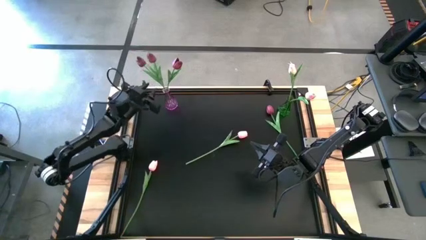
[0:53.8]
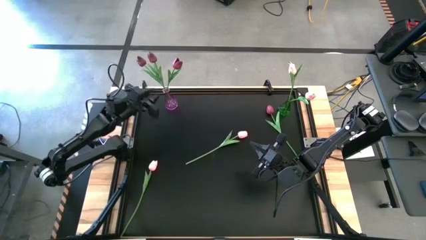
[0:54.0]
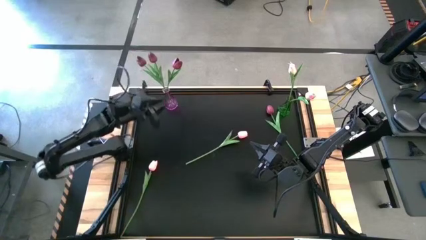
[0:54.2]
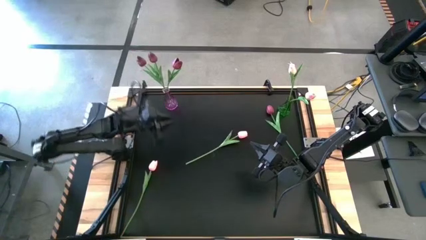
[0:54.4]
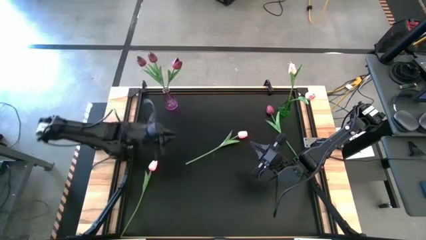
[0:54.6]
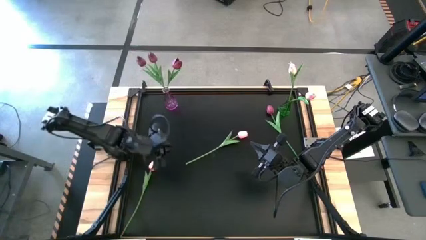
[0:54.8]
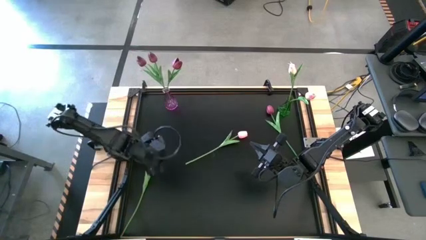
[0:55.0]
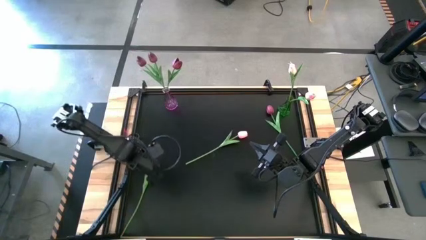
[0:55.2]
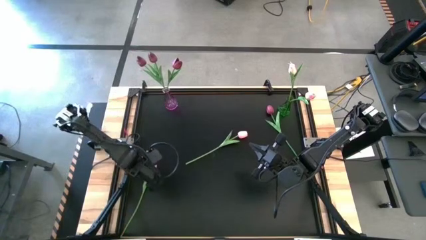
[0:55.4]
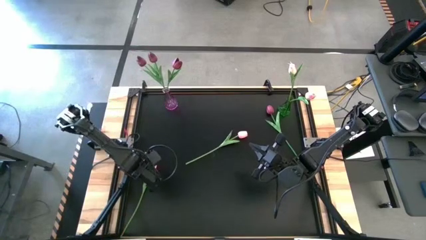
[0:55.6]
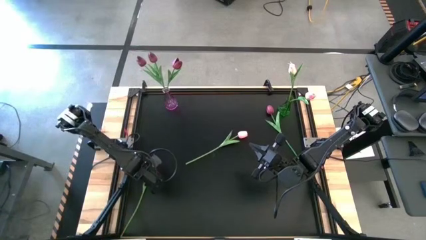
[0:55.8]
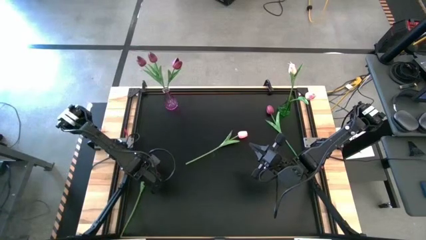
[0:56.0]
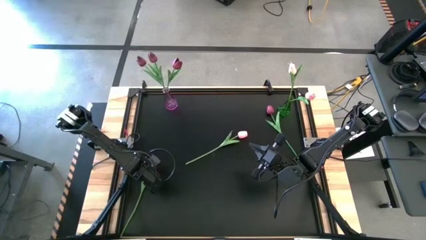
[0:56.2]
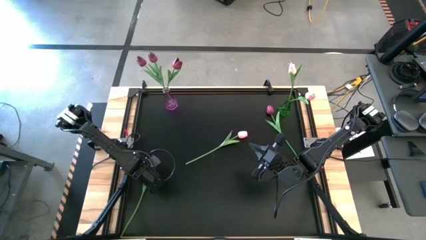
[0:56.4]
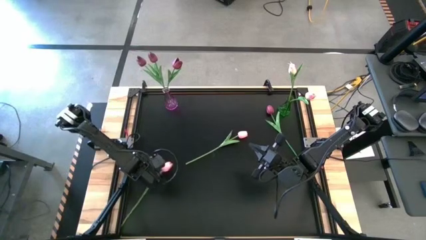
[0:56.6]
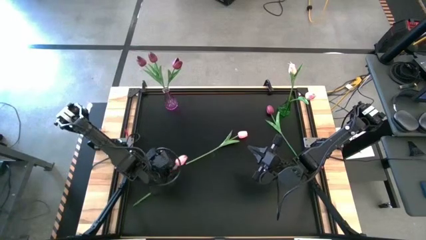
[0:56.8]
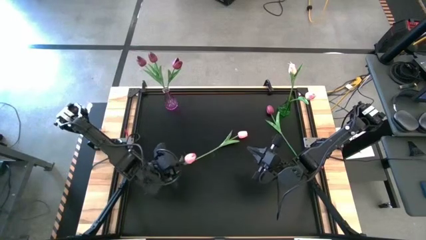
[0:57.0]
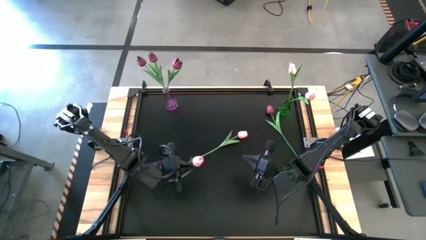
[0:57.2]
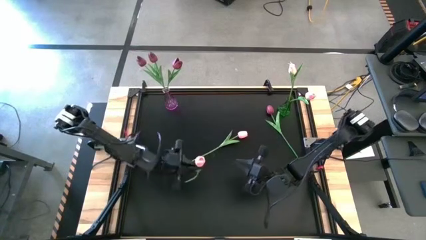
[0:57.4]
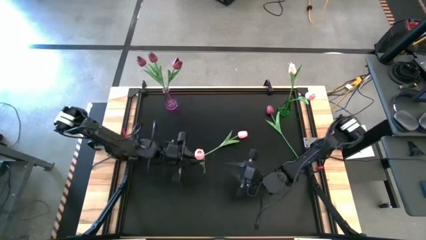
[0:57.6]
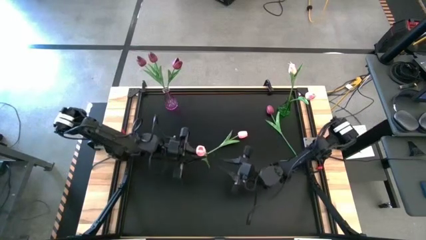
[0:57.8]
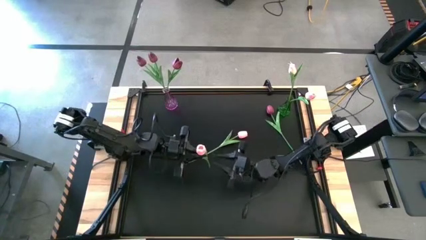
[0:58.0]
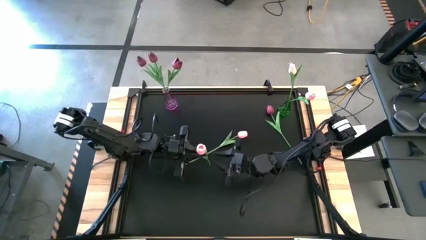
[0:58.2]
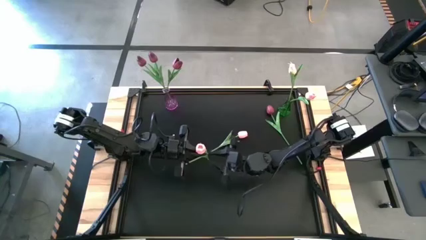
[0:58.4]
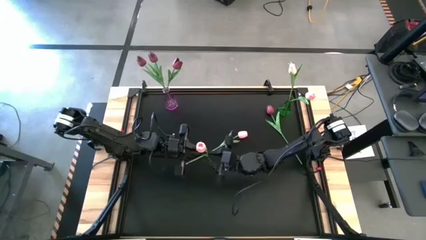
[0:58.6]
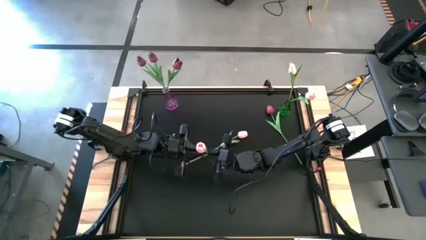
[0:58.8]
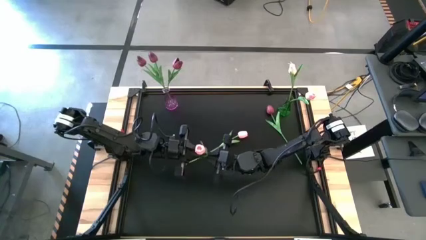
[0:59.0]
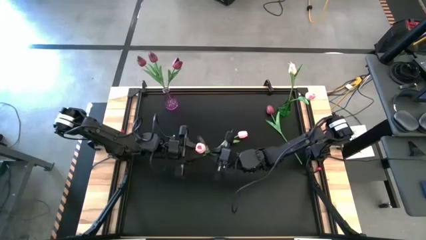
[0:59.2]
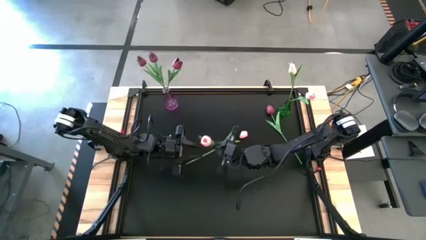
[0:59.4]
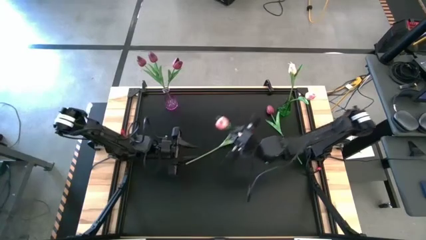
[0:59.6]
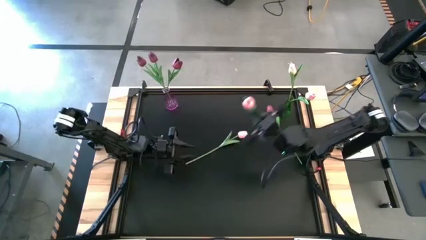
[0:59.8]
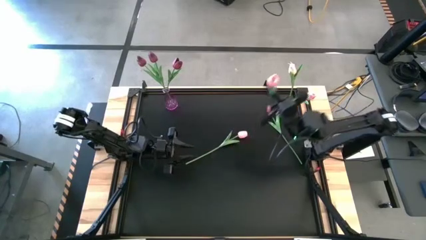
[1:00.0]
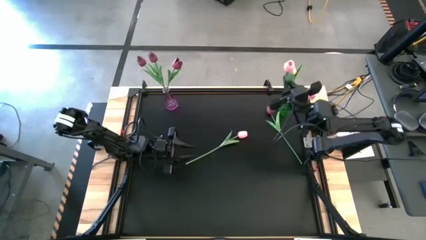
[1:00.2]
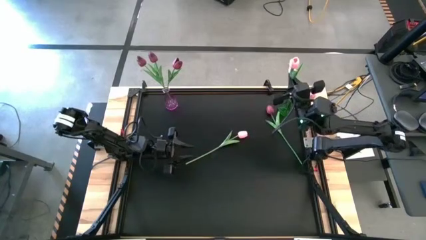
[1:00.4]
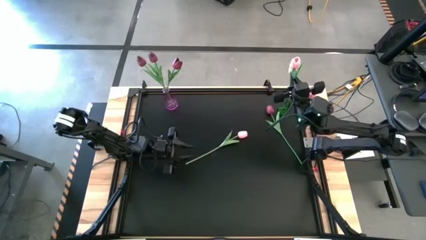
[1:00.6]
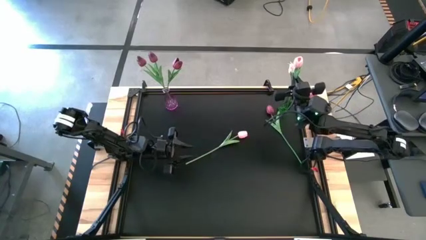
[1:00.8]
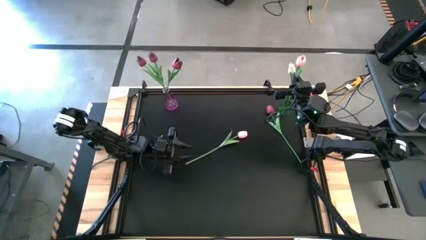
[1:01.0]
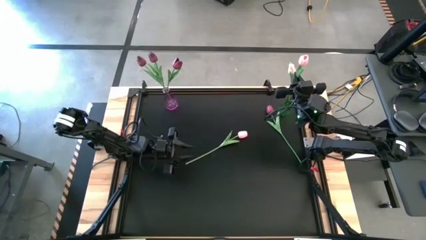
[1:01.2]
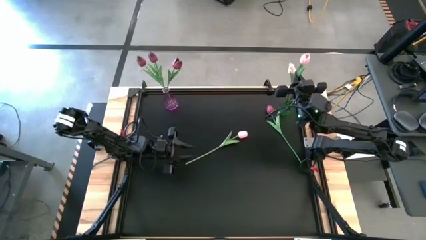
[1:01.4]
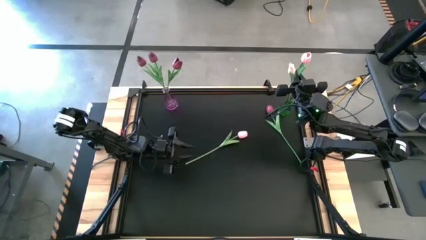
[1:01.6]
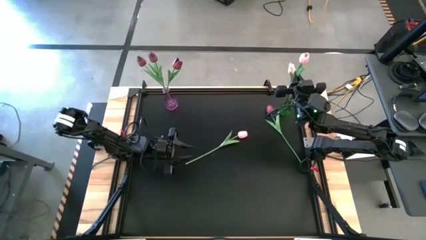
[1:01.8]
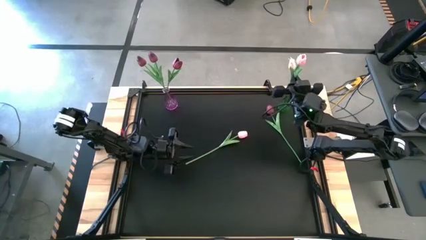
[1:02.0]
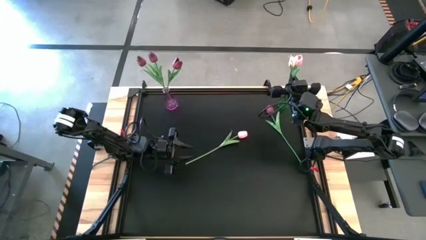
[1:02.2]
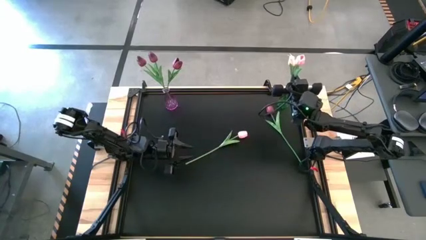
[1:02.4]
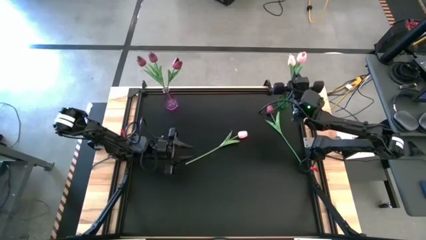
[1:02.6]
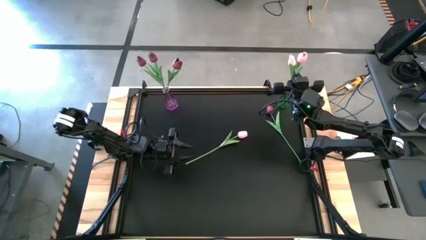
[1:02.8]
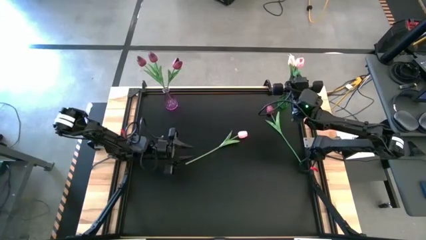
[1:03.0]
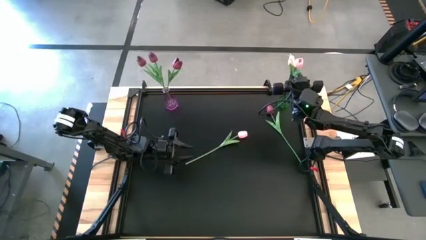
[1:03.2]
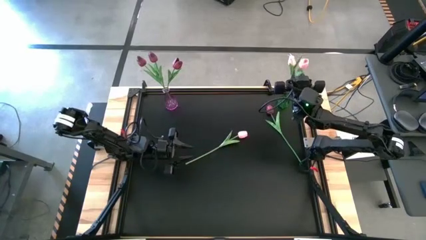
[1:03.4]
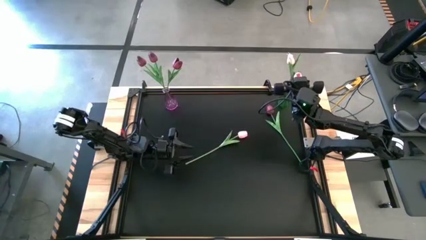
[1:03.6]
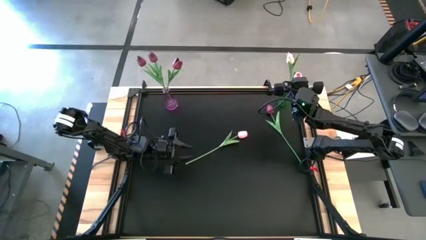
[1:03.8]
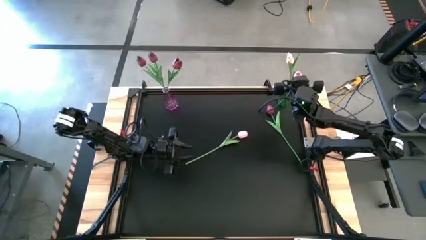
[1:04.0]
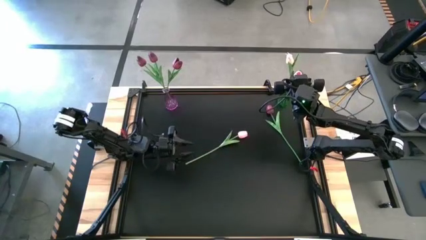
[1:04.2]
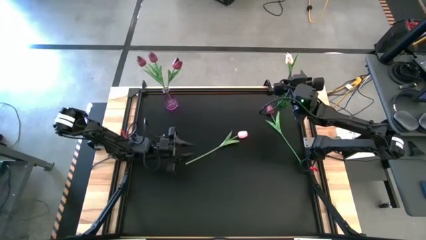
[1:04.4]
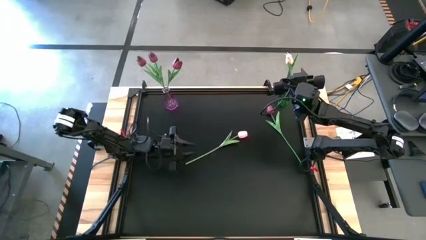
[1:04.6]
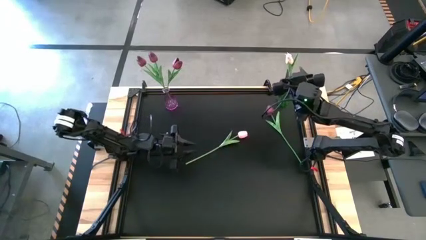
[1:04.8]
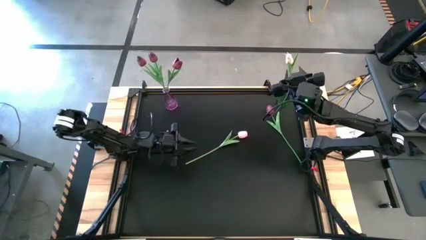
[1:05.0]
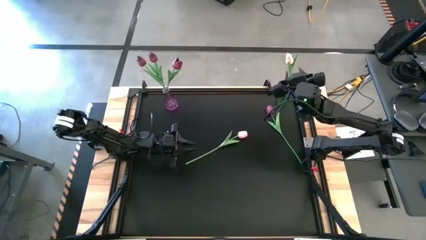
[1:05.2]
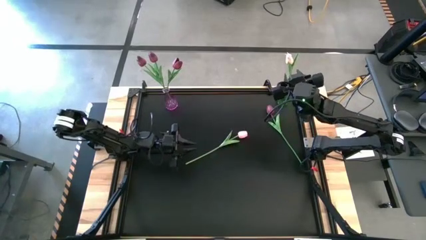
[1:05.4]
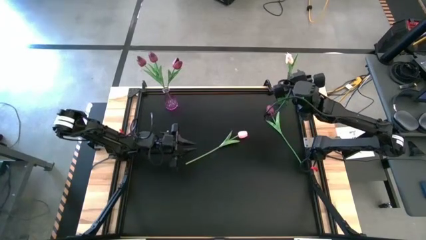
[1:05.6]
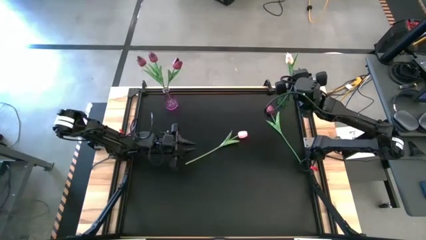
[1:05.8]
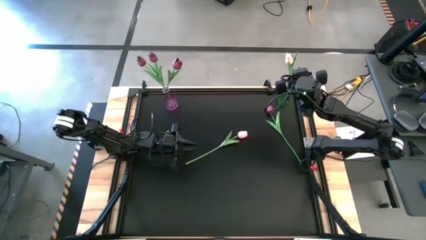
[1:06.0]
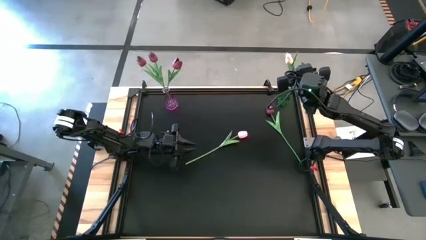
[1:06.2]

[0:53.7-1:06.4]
Task: Sort flowers into vase by color
Put the pink flower into the green vase
